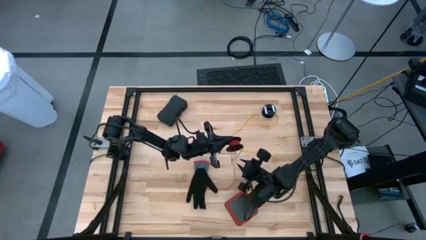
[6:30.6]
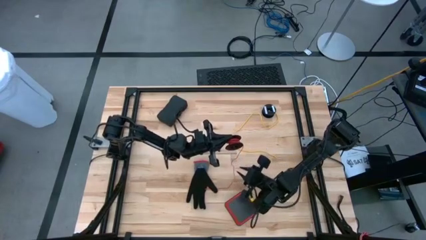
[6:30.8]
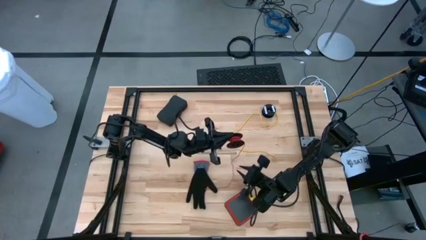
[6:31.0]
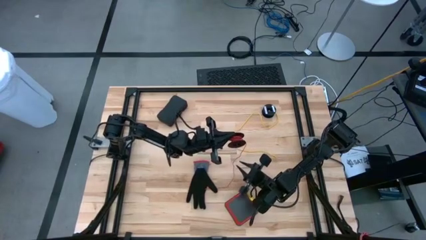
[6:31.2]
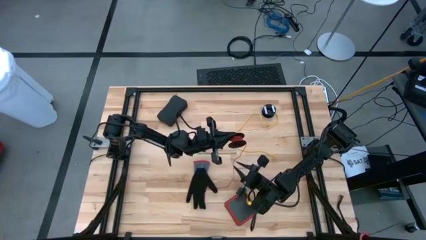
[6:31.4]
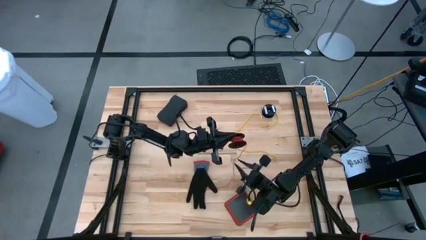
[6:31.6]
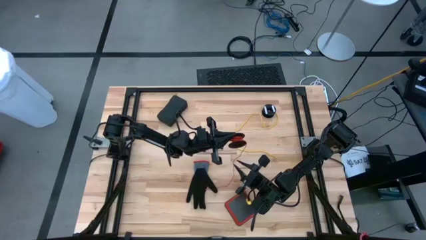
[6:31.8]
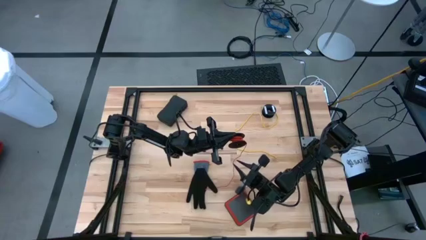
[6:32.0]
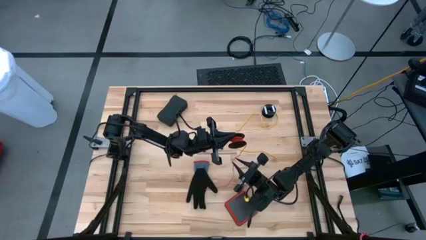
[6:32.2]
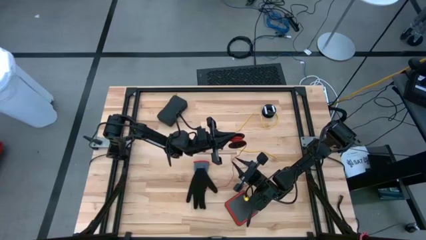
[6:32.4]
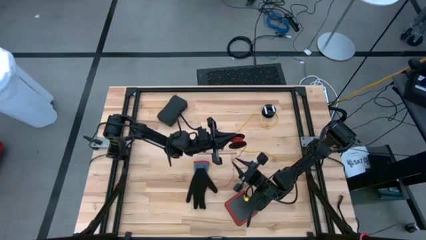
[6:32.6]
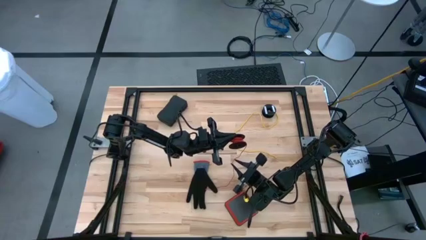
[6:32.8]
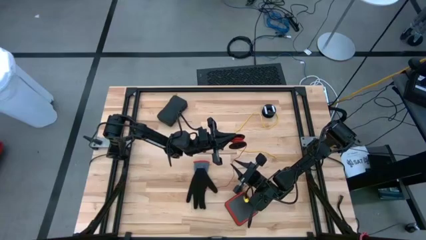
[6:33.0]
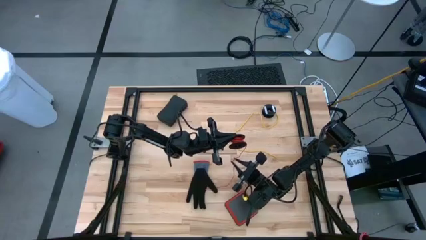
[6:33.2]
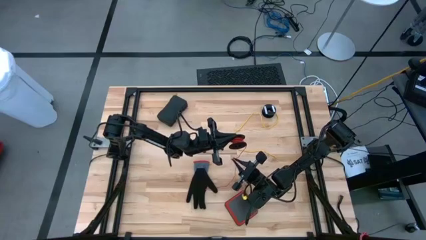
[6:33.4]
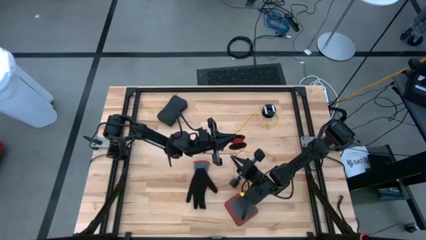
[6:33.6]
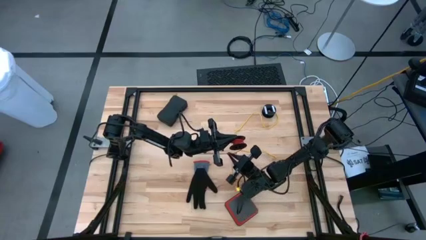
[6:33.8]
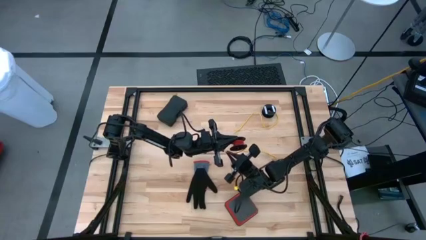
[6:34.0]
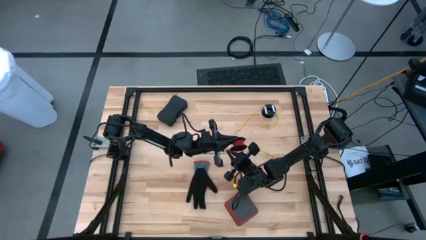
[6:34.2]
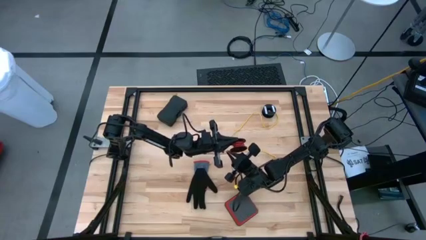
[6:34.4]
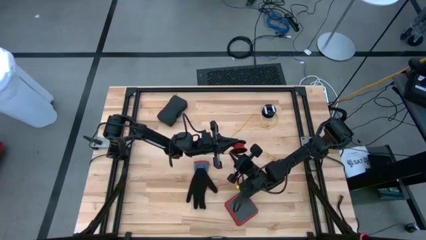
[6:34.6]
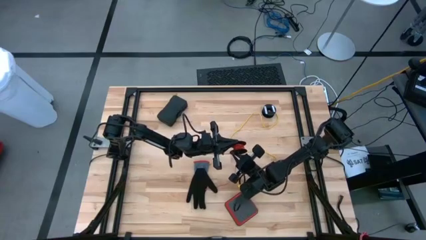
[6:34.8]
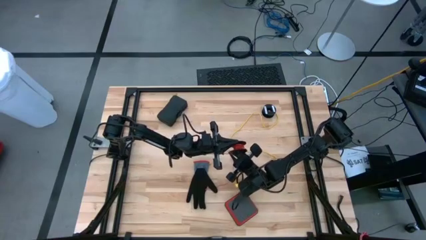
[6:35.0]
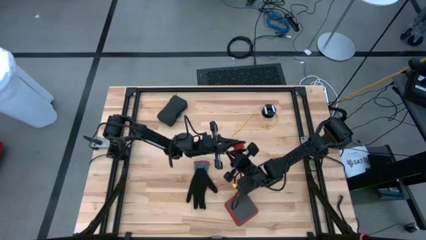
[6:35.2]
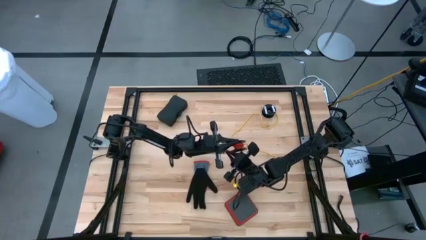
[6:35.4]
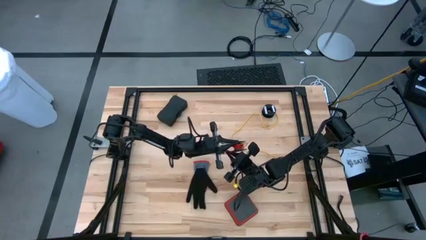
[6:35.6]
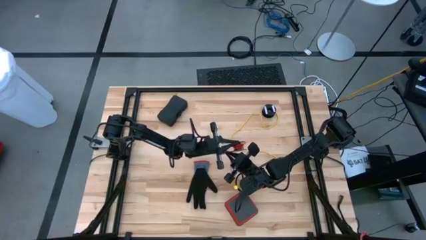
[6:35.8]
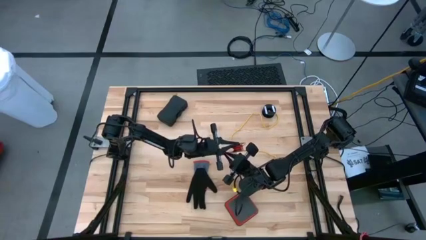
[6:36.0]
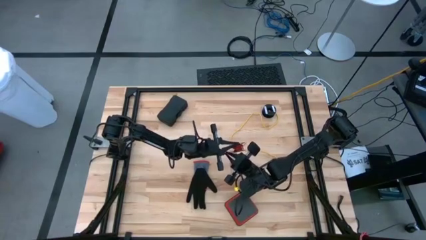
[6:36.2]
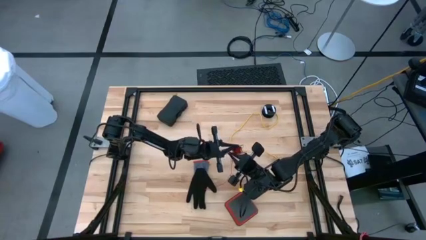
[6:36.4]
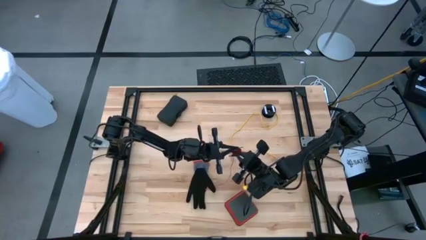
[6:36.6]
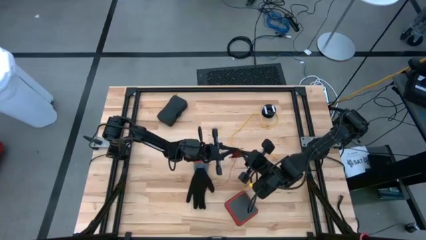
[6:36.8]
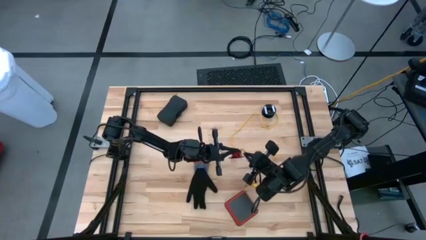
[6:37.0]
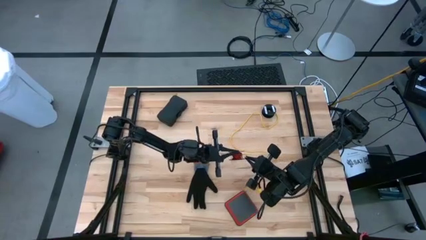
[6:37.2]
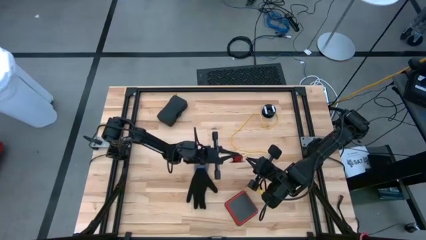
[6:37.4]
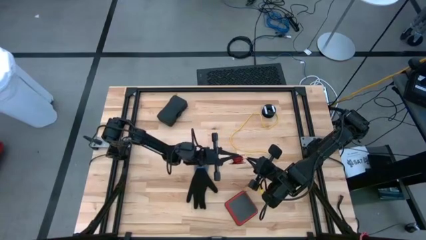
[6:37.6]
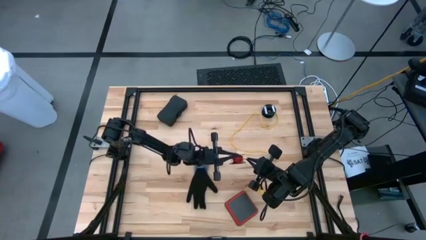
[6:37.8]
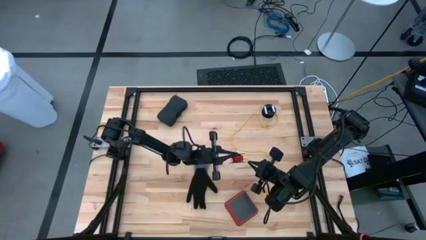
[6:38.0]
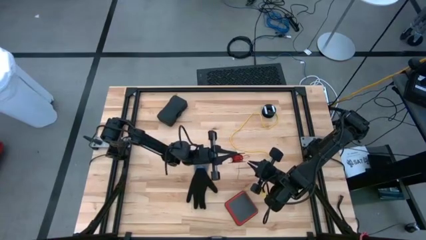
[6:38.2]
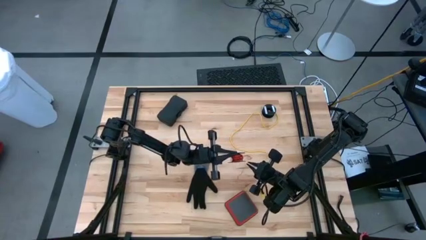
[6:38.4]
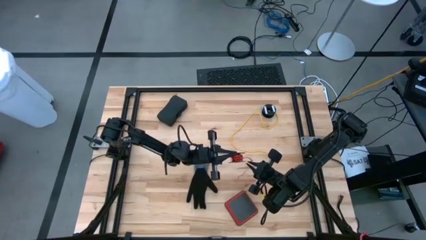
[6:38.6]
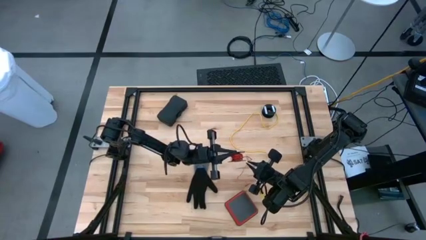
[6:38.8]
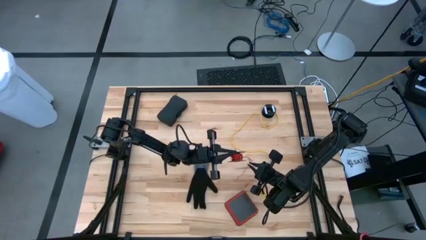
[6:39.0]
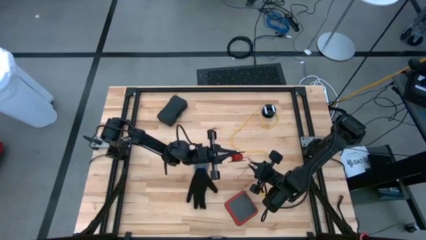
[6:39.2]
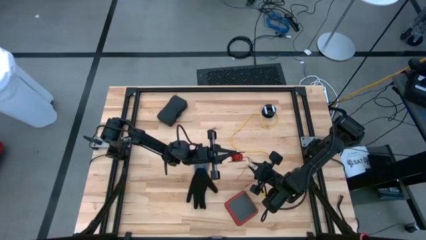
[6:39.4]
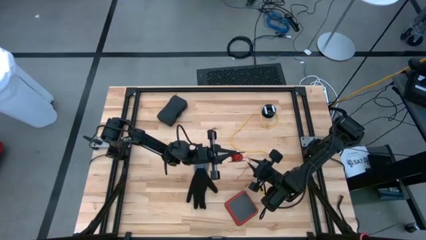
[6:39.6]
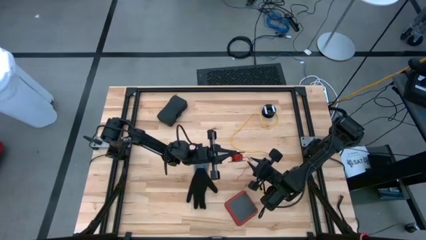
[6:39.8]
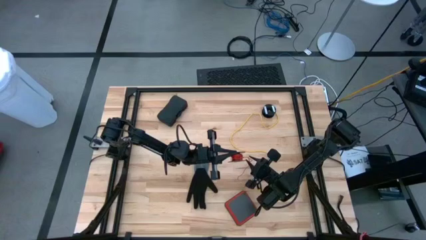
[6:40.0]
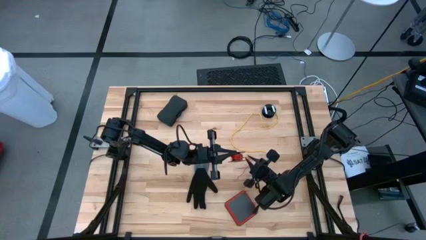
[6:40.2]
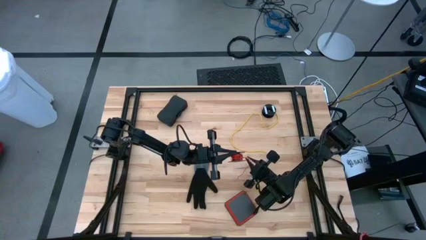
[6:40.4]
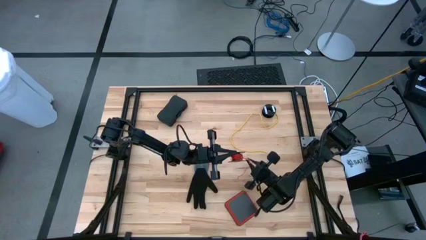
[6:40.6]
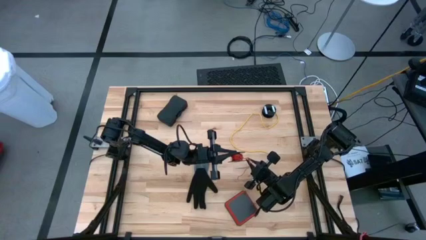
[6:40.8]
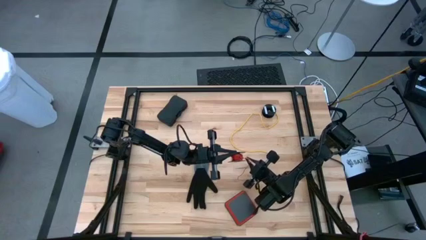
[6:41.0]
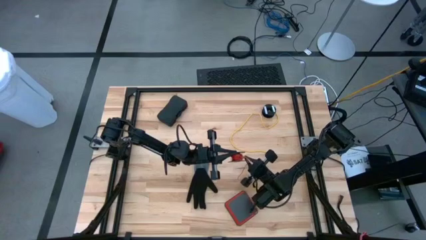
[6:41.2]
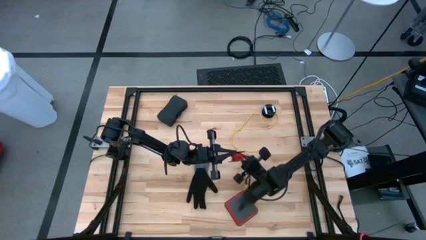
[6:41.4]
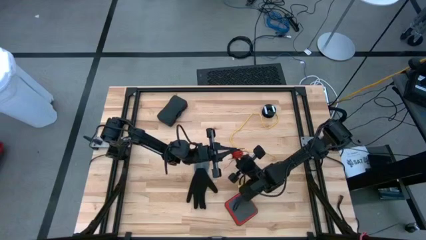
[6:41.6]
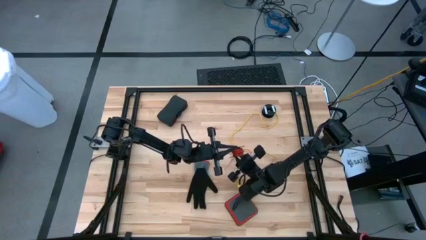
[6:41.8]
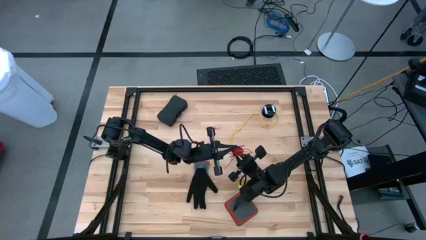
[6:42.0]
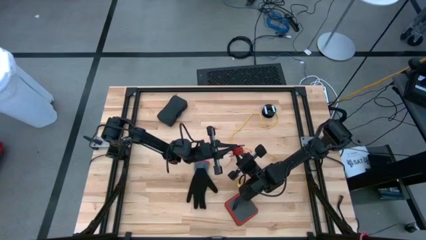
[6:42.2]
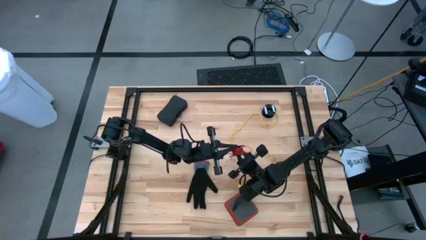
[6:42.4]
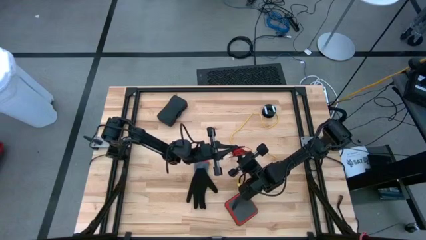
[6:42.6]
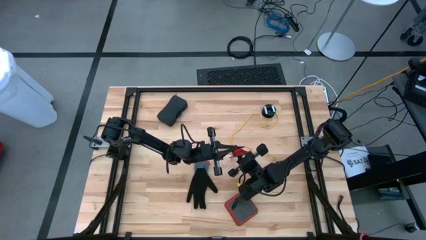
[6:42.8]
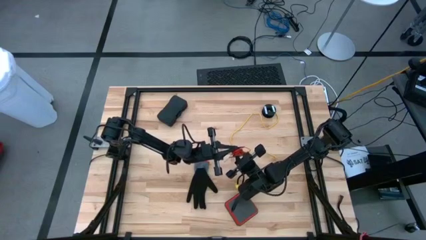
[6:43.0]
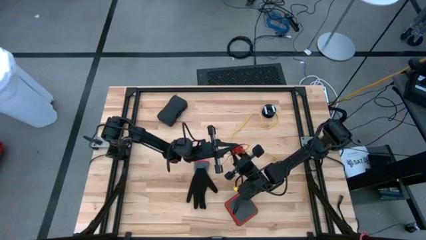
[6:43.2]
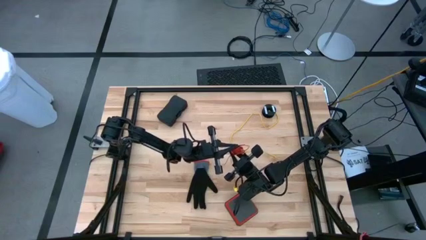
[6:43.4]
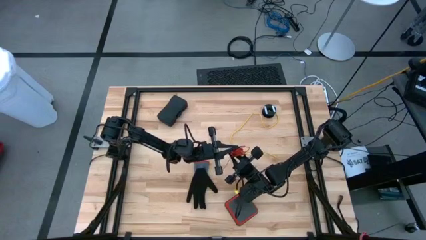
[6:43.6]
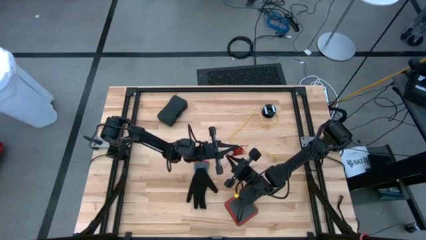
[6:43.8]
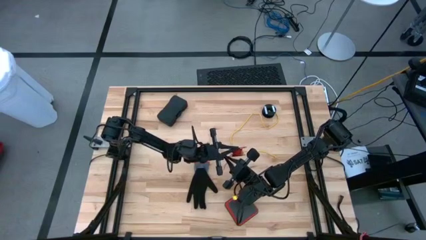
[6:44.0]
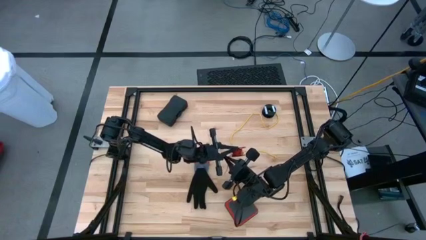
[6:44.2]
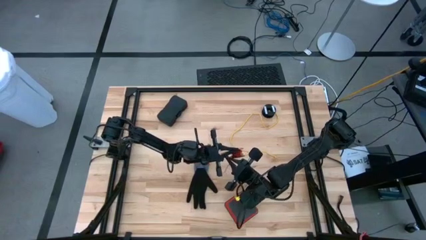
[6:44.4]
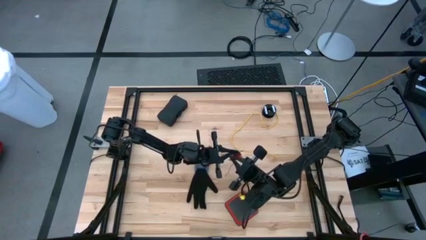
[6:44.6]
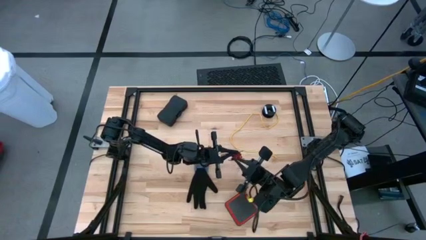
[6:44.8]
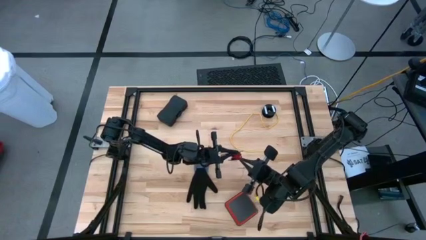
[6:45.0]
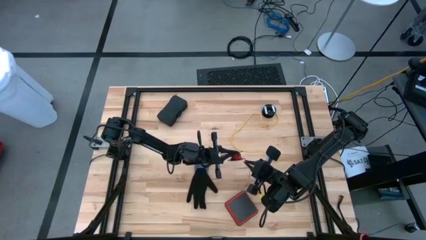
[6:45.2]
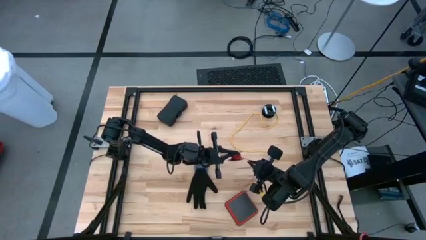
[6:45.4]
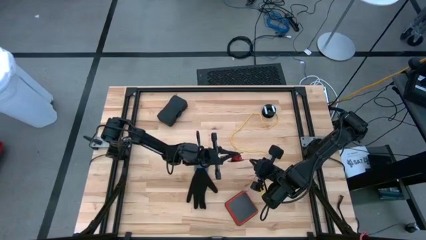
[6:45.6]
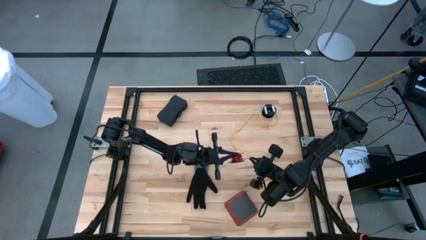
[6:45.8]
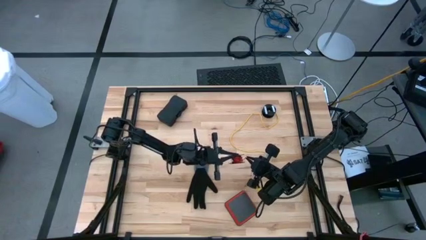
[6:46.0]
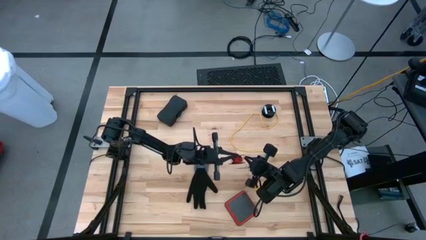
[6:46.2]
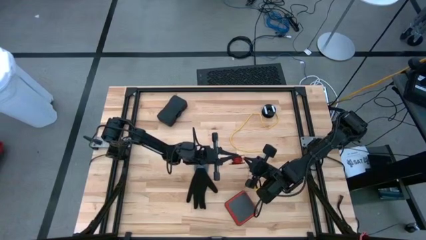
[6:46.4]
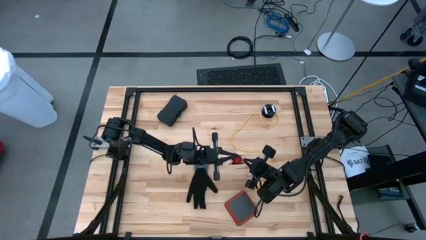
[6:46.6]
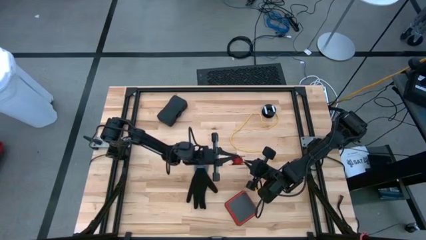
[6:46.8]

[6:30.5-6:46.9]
Task: Coil cords
Coil the red wire onto the black spool
